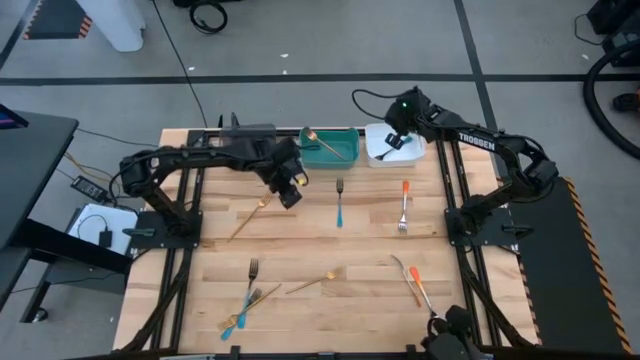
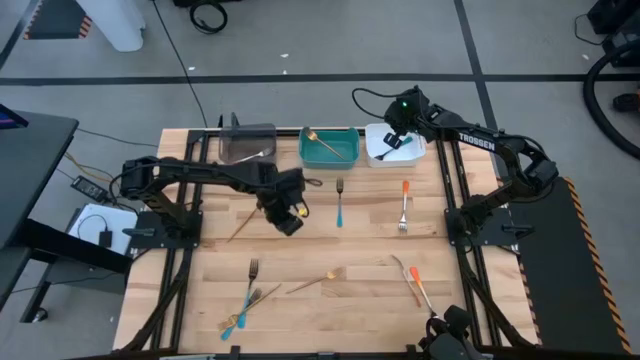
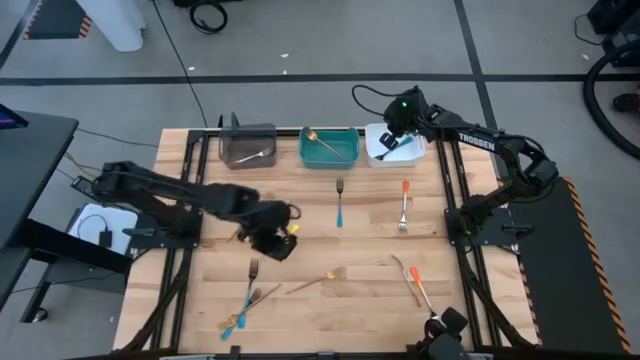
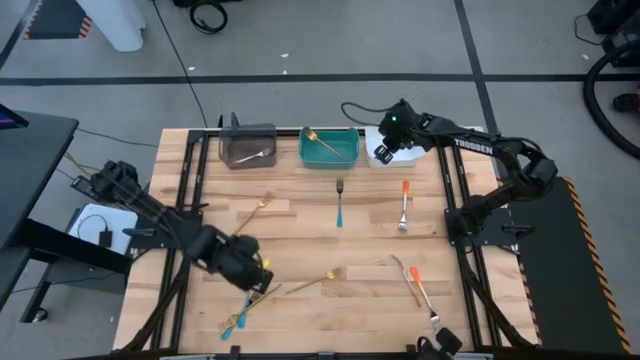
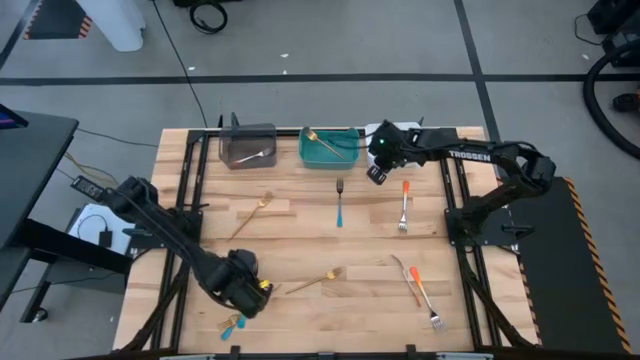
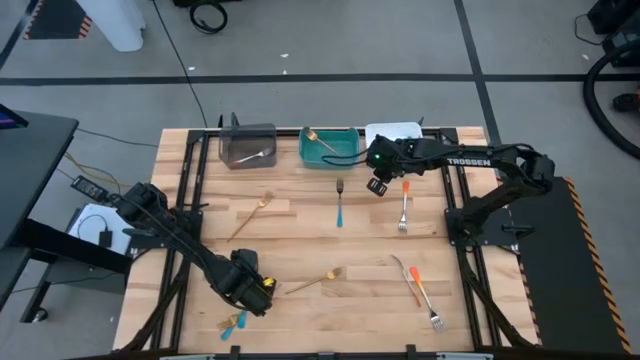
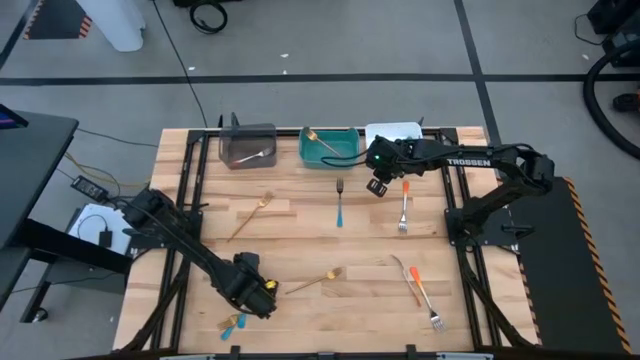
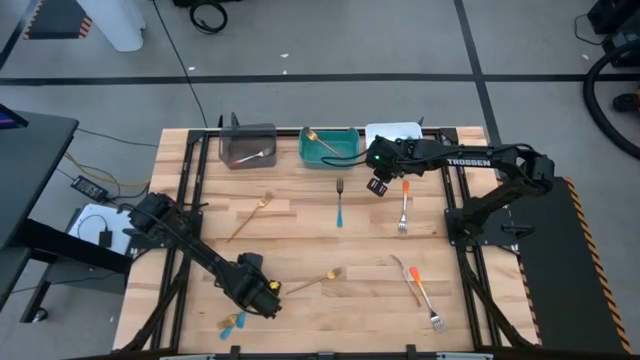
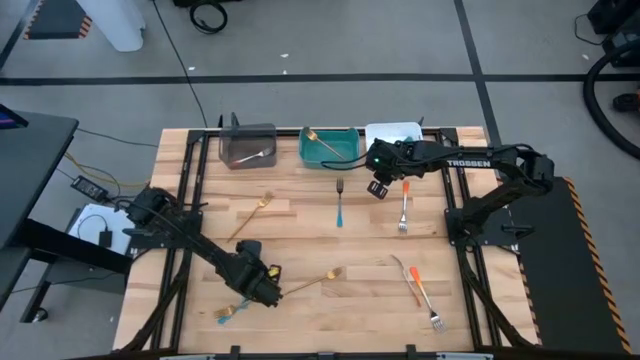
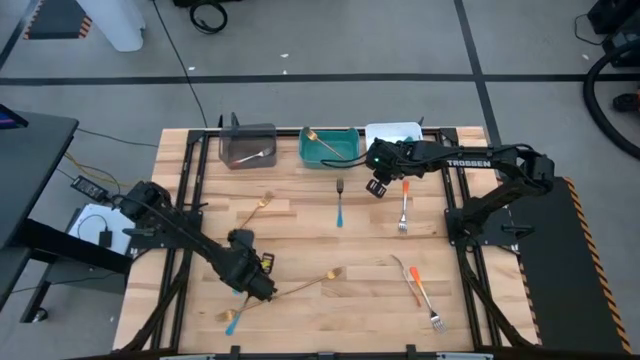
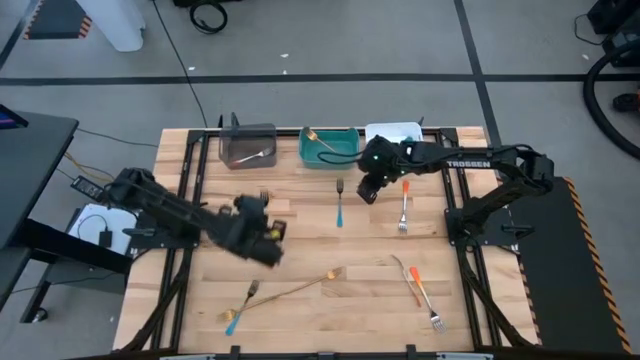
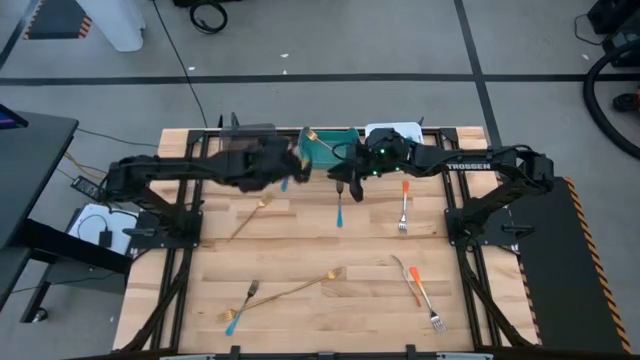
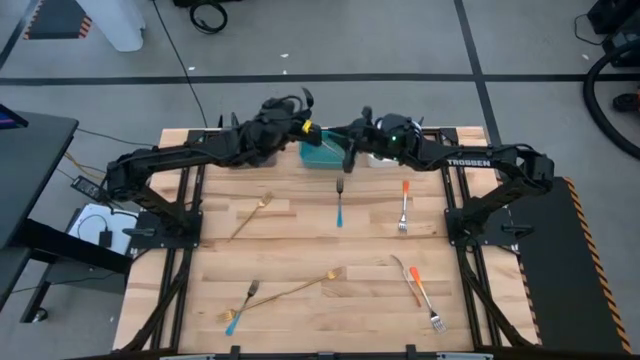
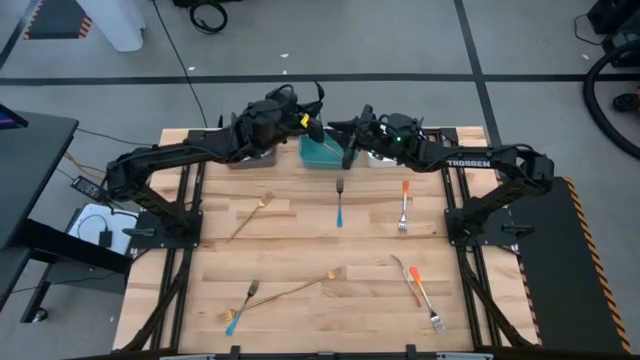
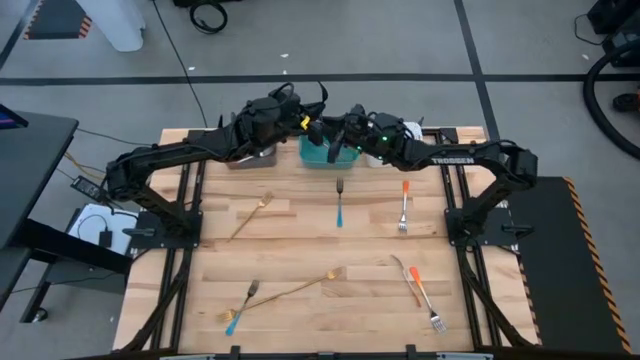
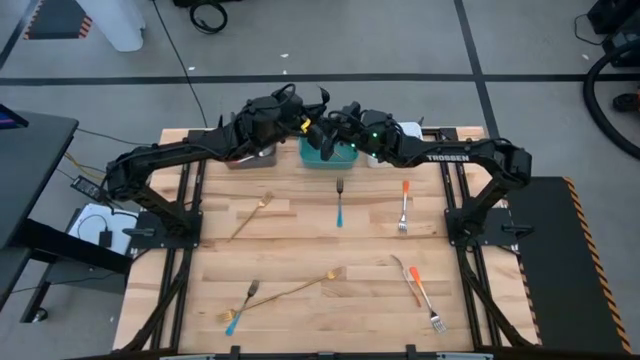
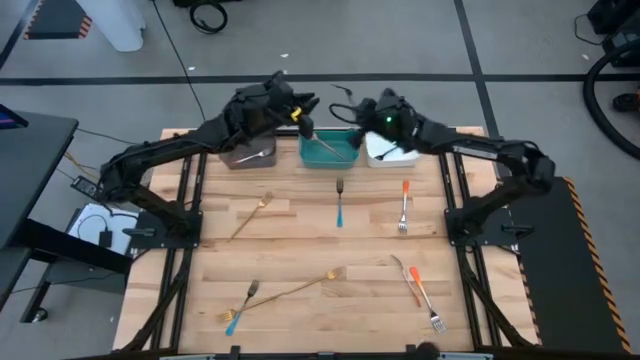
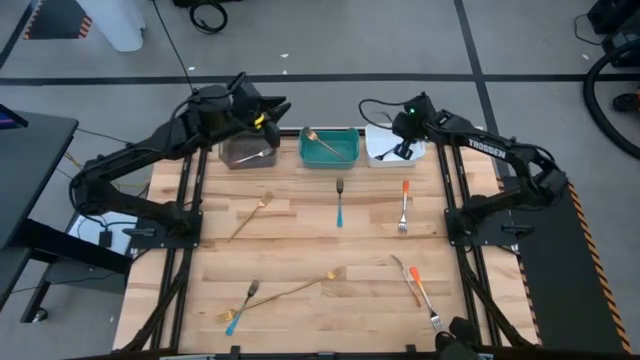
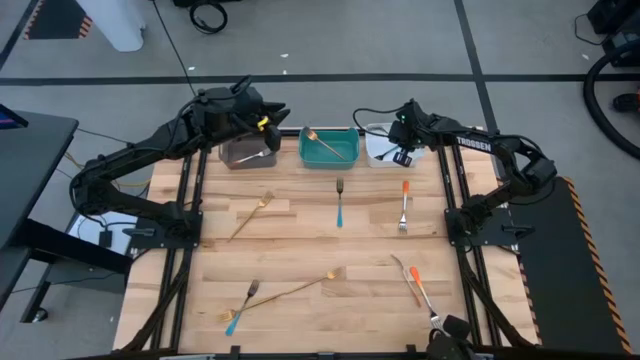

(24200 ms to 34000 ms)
Task: Sort silverware by color (type)
Put the blue fork into the white bin

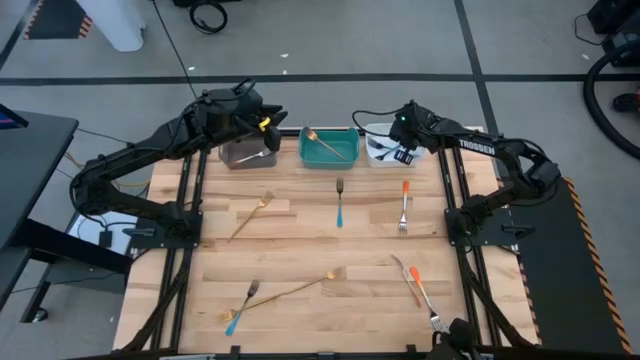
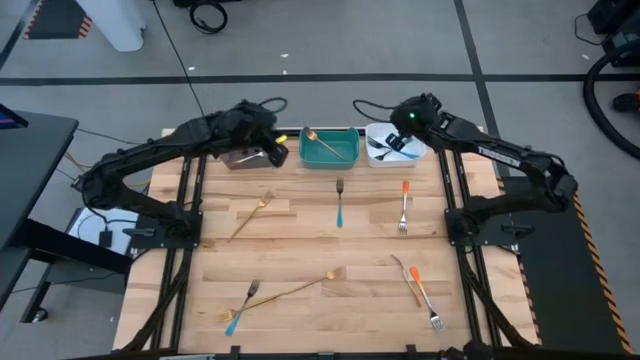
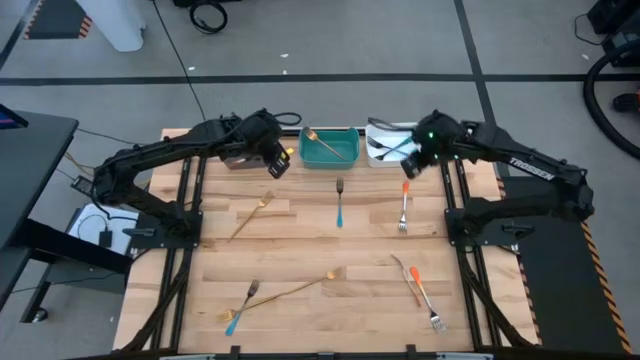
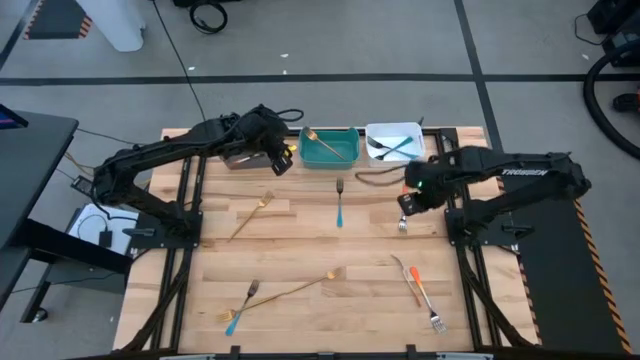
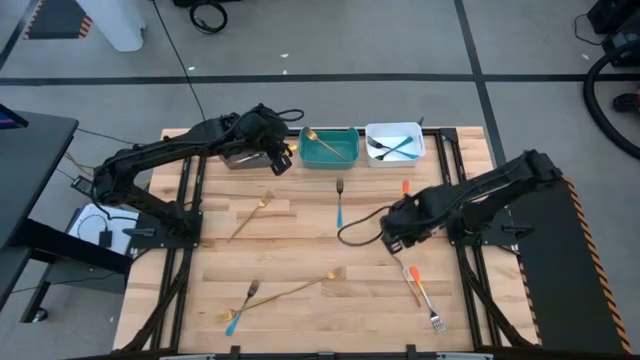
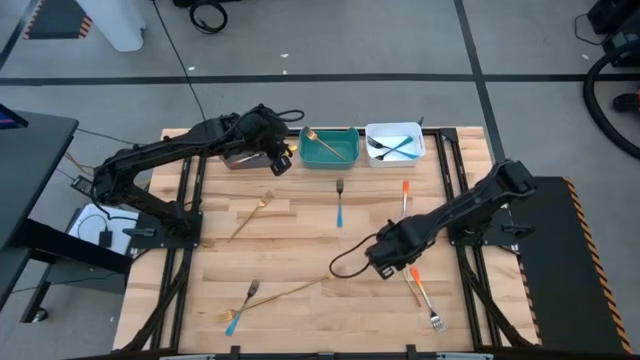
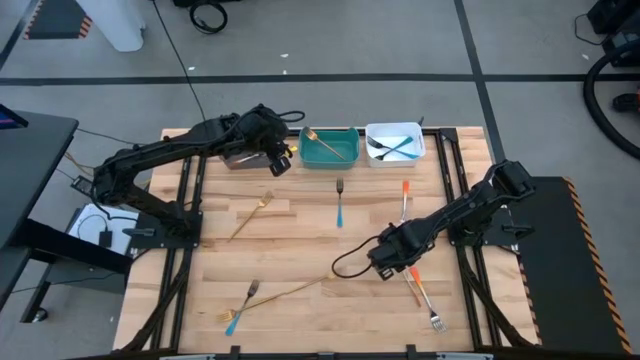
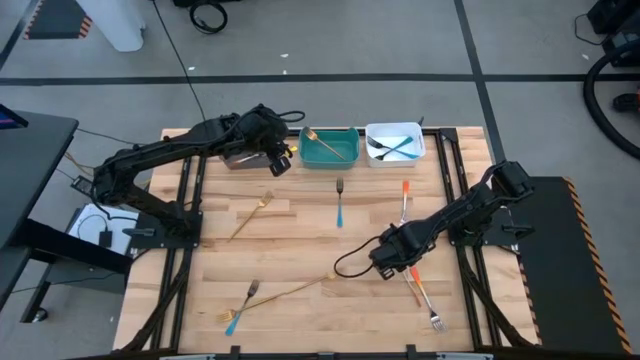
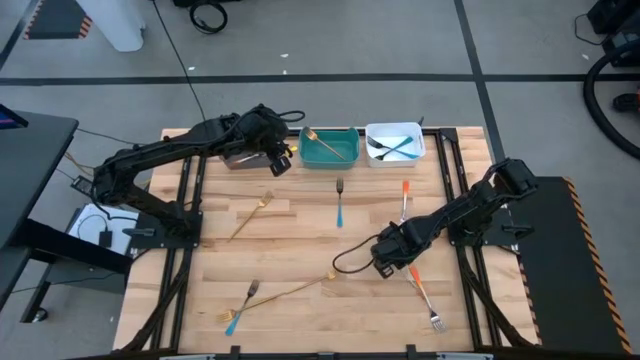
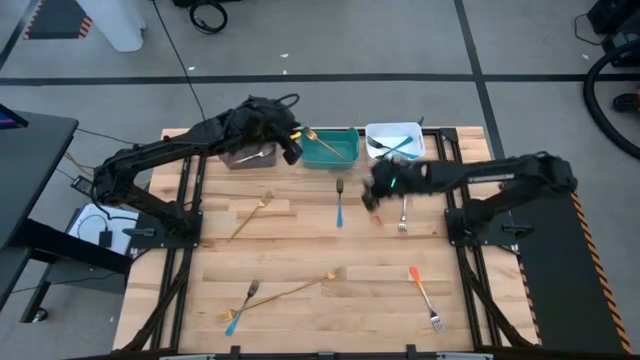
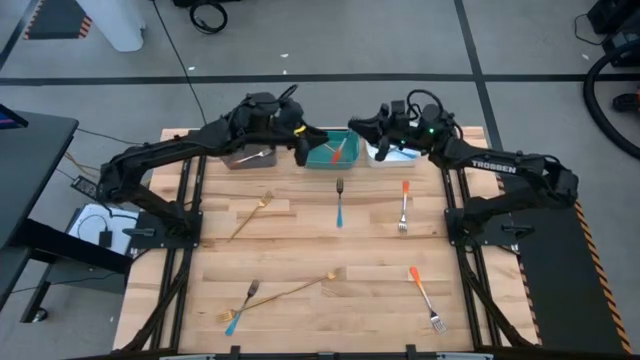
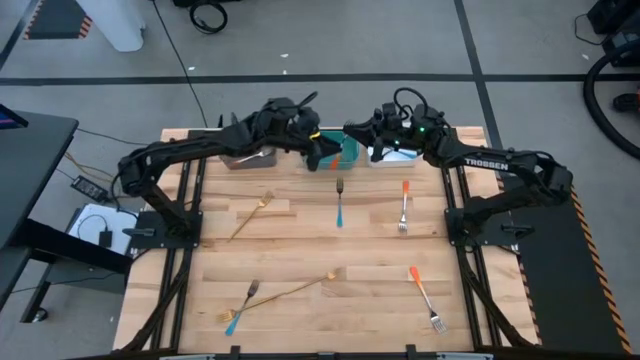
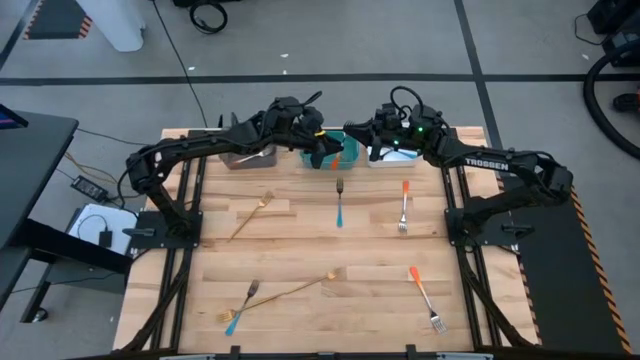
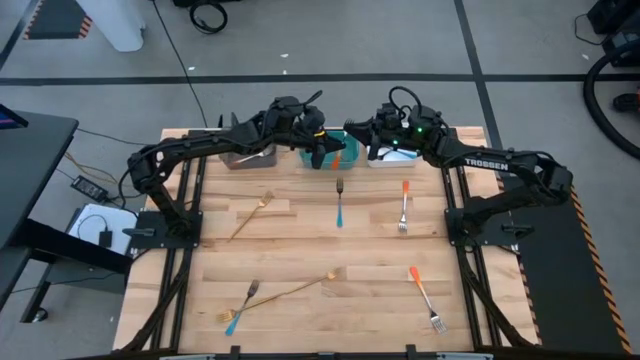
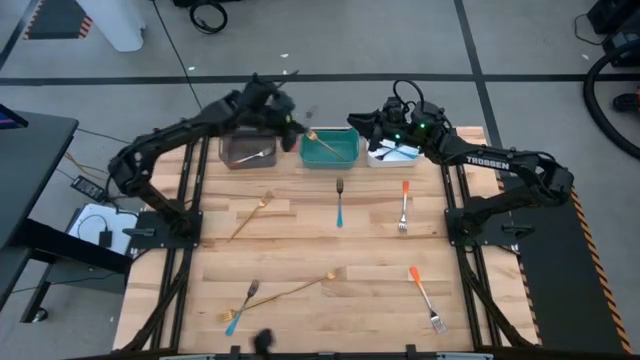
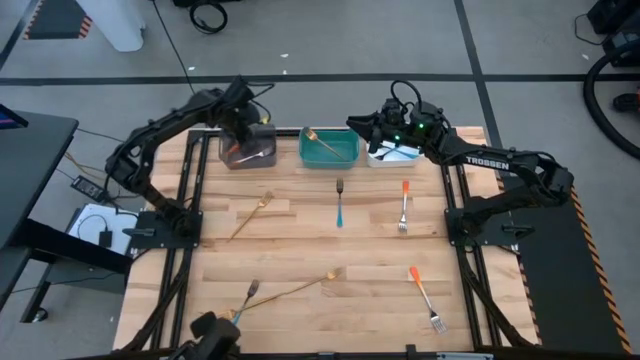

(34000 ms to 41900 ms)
Put the orange fork into the black bin

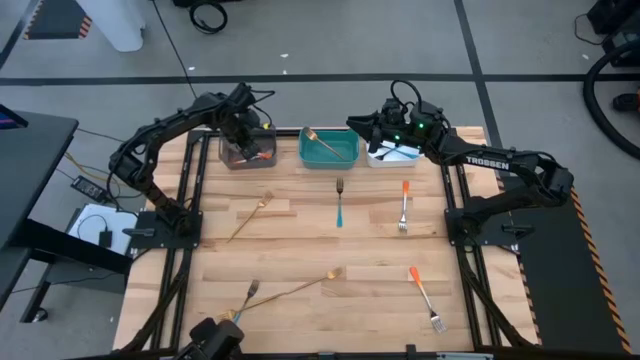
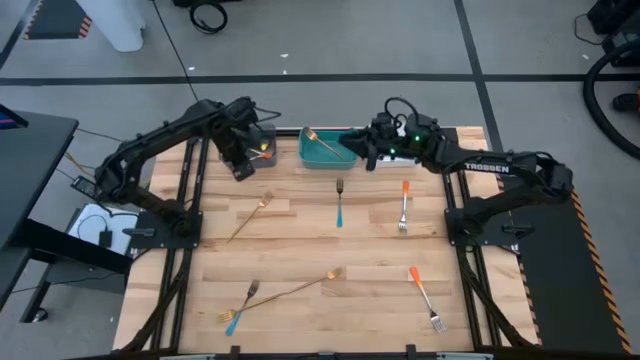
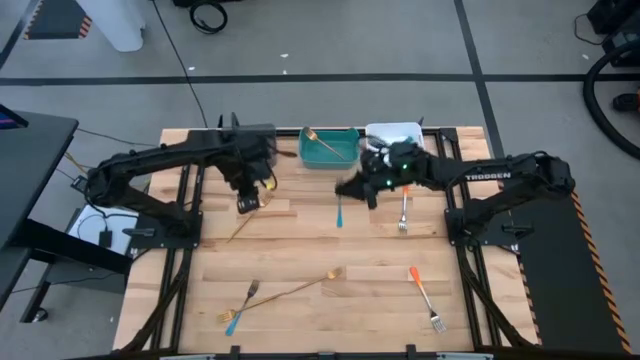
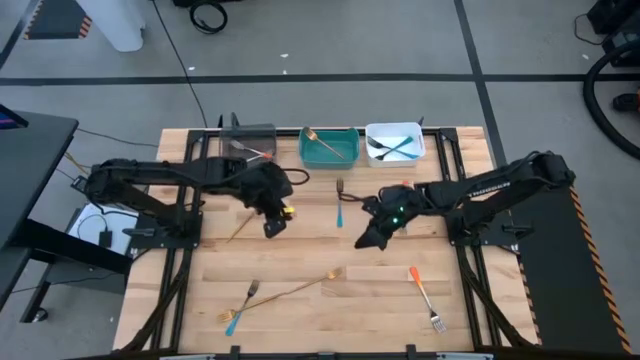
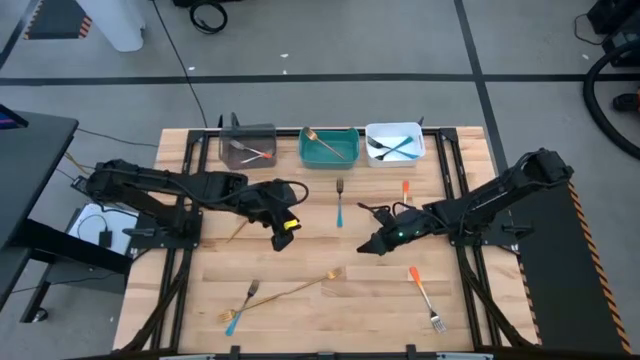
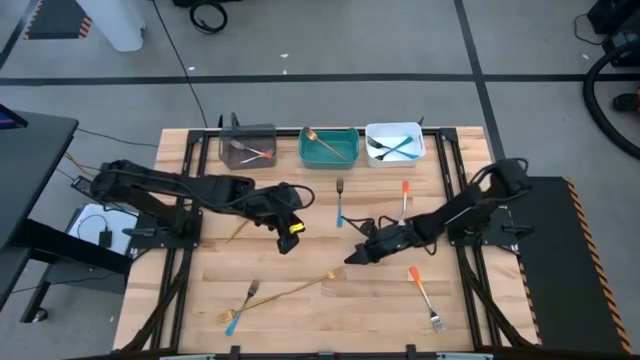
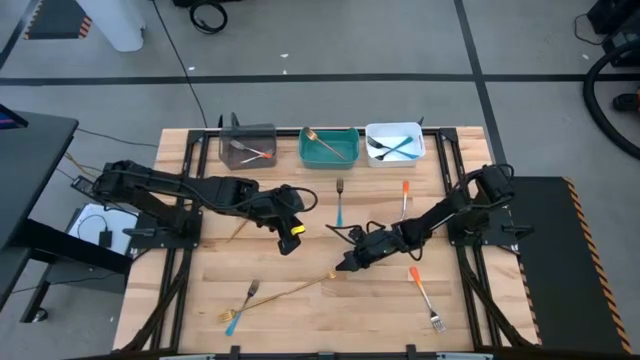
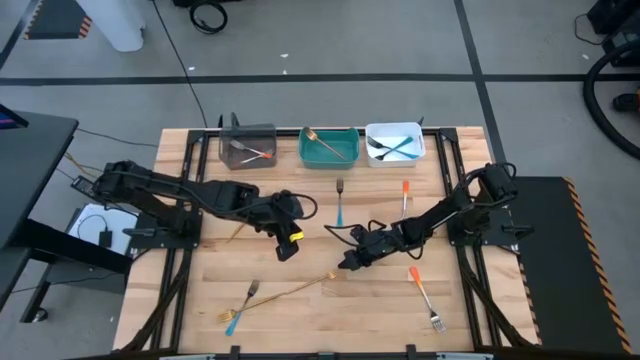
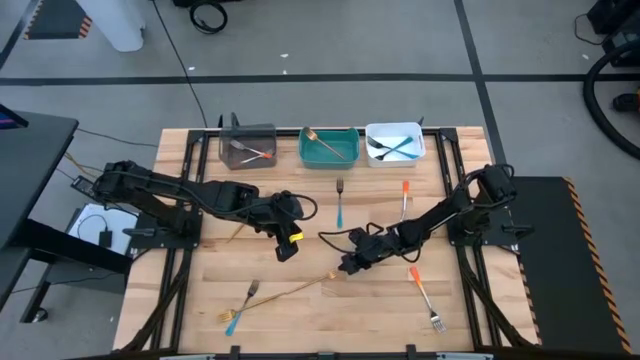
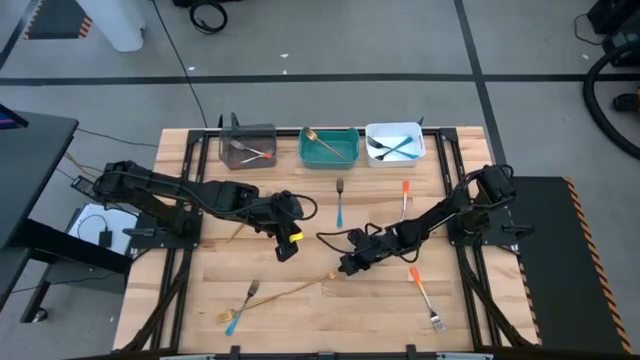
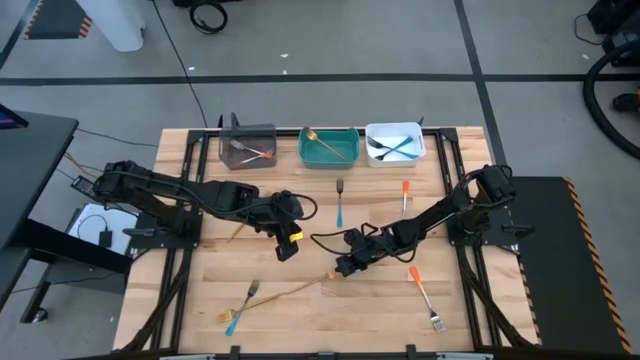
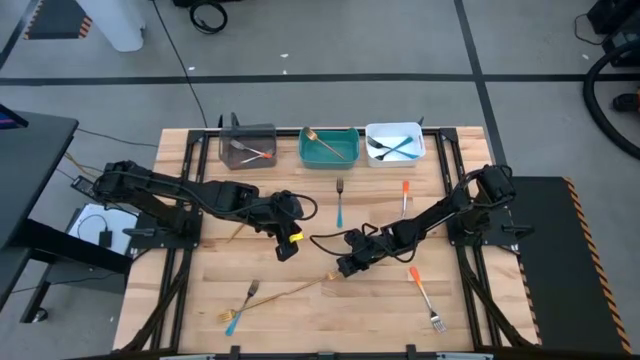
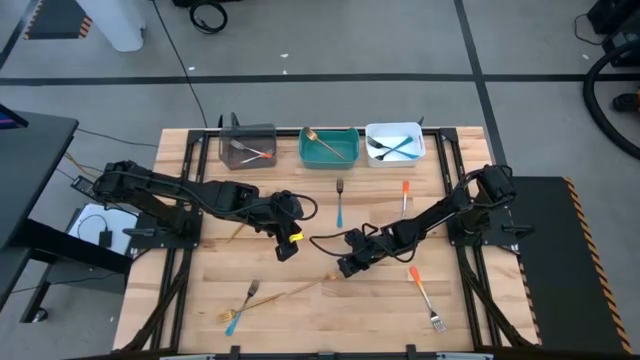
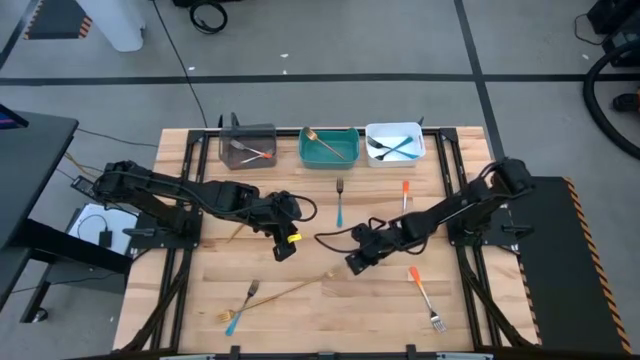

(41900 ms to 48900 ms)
Put the gold fork into the green bin
